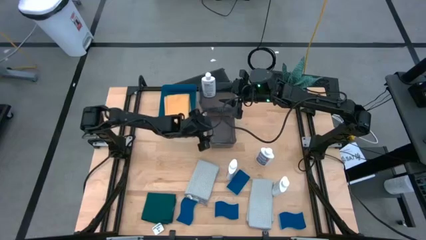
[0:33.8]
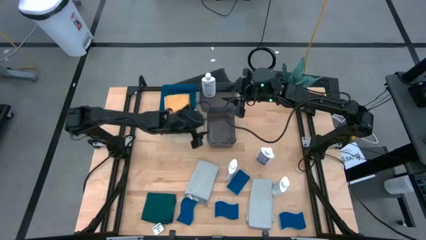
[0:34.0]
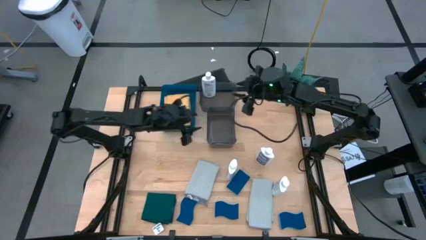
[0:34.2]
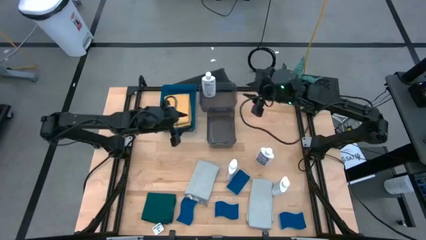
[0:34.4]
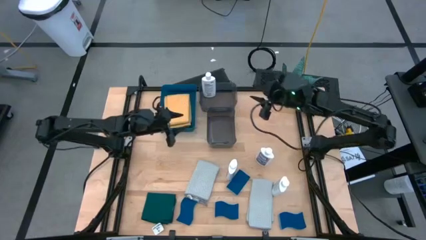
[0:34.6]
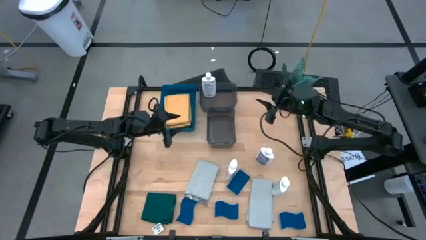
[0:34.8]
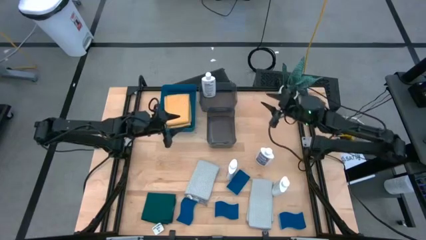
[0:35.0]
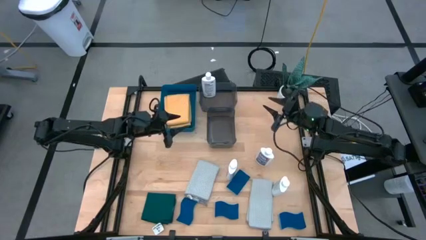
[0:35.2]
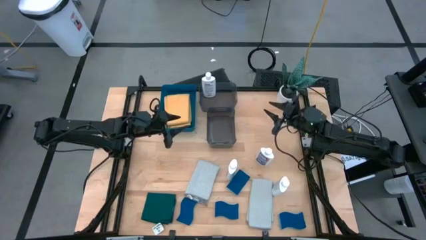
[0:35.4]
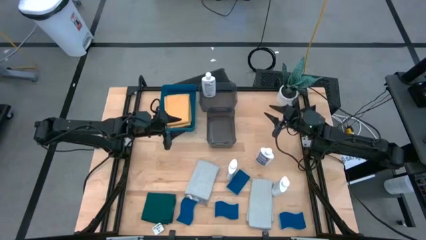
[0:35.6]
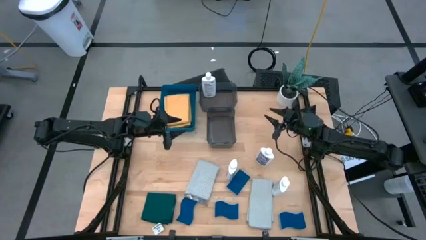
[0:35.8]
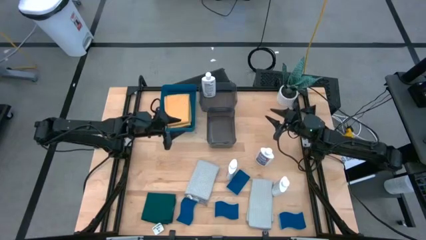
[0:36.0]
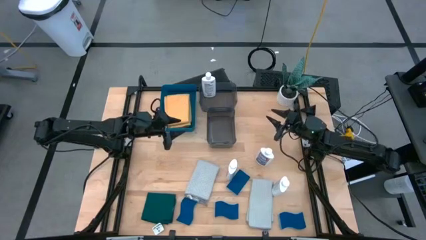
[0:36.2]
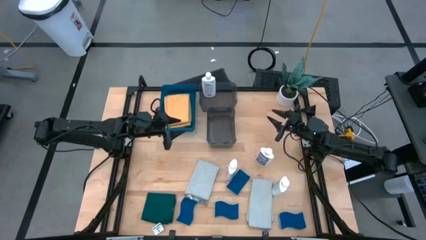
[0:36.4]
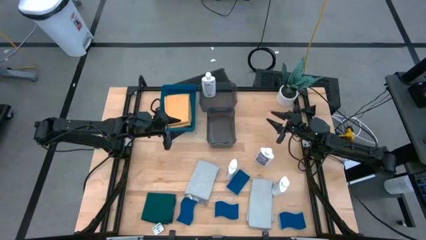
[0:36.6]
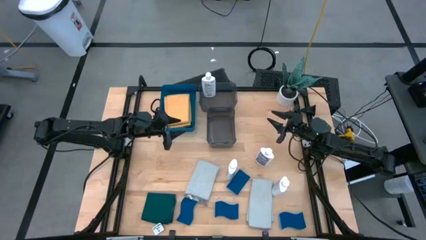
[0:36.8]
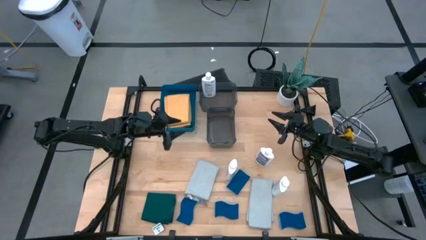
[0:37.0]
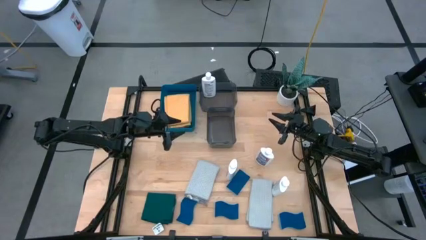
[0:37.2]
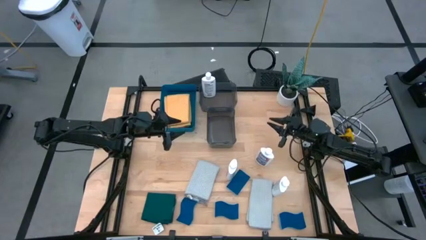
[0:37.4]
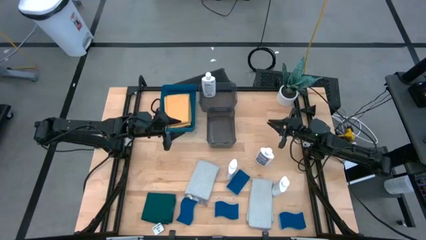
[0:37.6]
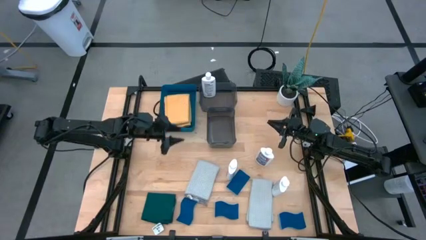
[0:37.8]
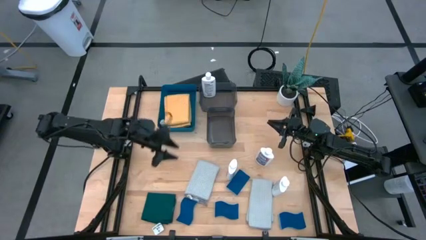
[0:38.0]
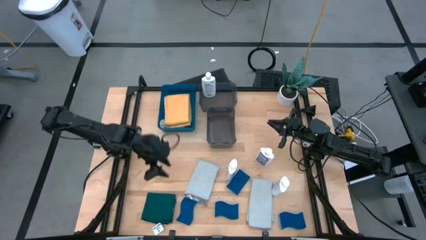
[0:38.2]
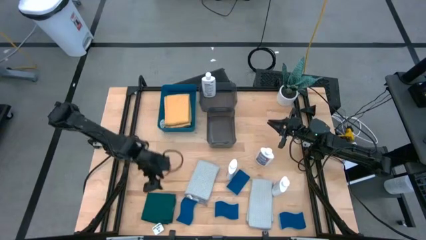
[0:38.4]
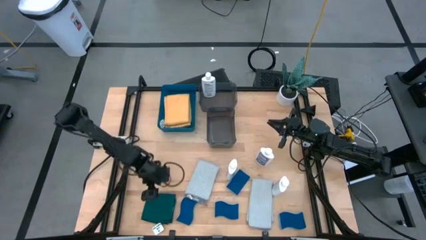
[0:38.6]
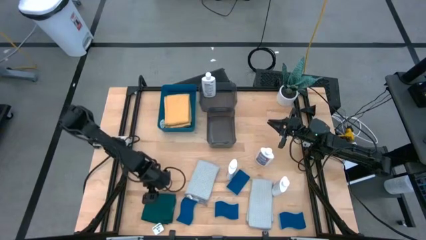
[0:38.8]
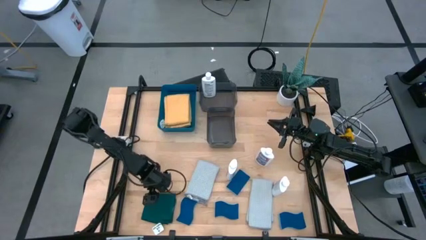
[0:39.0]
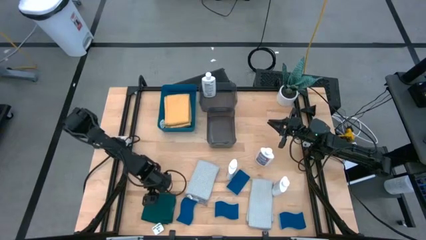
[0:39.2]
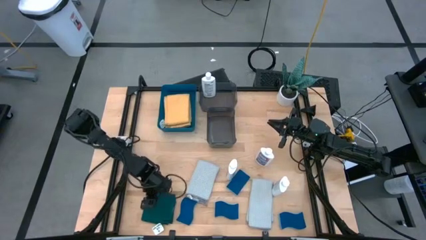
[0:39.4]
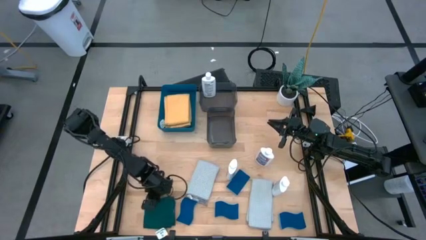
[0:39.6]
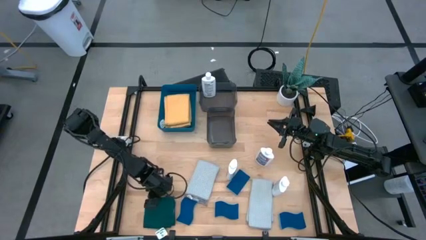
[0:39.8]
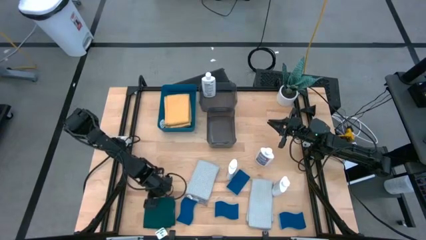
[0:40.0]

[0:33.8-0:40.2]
Task: Pick & Place Kitchen Items
Put the green microfiber towel into the blue bin

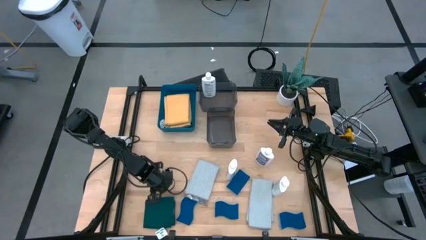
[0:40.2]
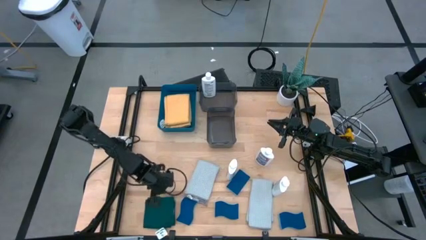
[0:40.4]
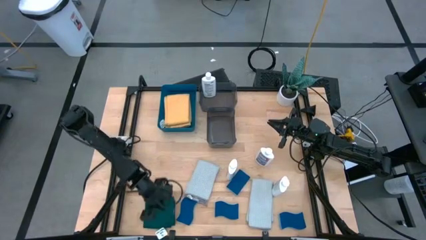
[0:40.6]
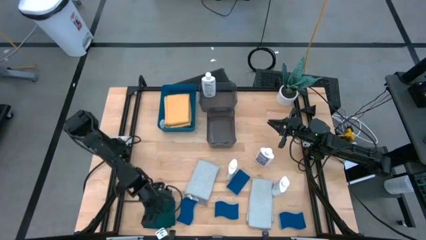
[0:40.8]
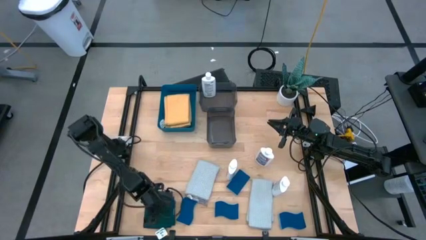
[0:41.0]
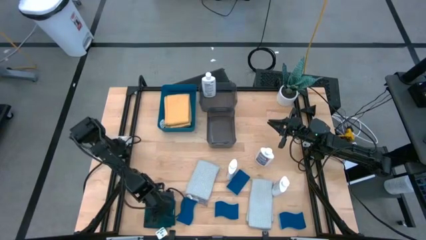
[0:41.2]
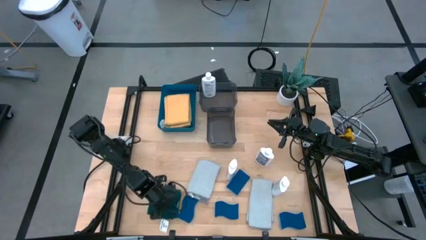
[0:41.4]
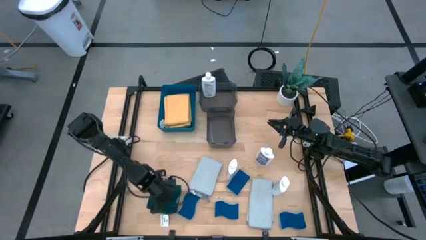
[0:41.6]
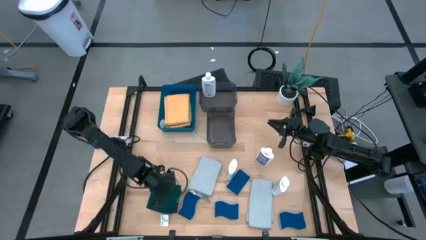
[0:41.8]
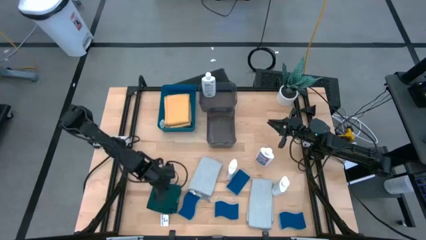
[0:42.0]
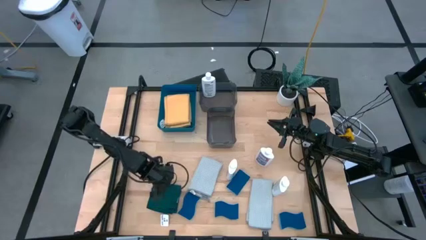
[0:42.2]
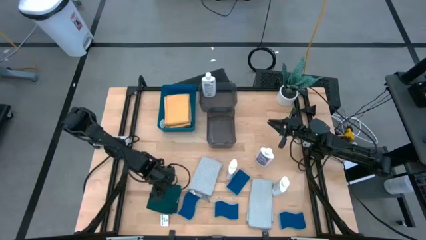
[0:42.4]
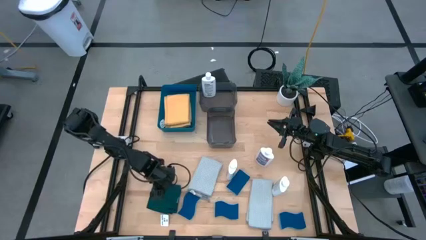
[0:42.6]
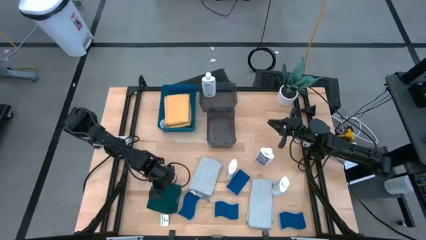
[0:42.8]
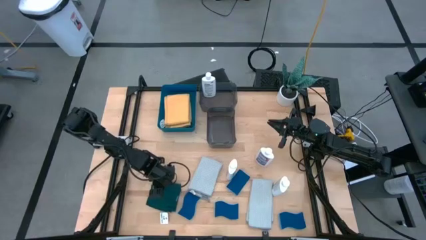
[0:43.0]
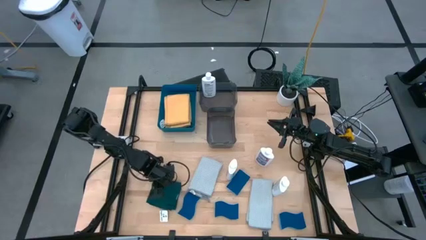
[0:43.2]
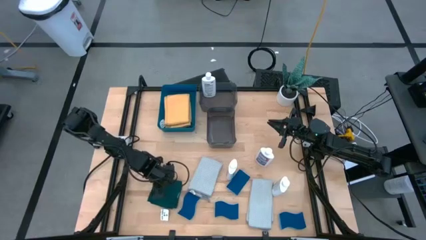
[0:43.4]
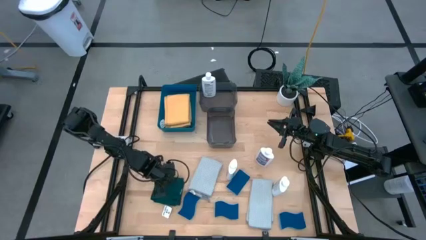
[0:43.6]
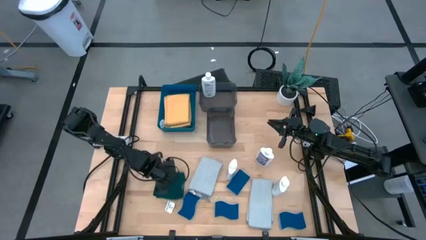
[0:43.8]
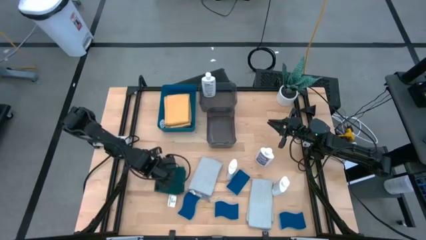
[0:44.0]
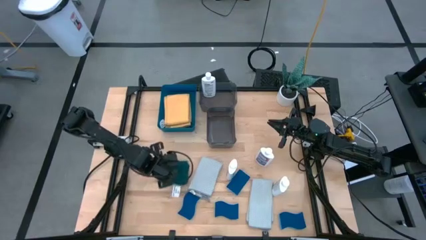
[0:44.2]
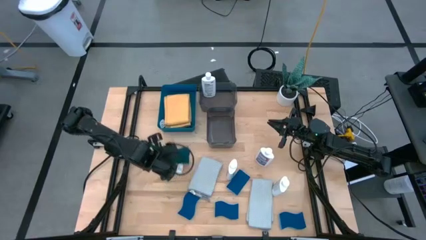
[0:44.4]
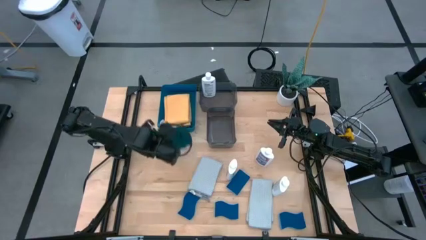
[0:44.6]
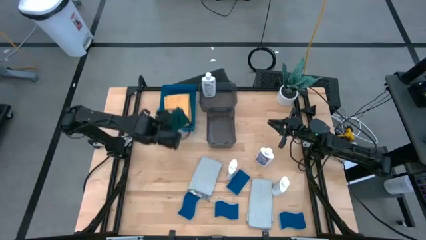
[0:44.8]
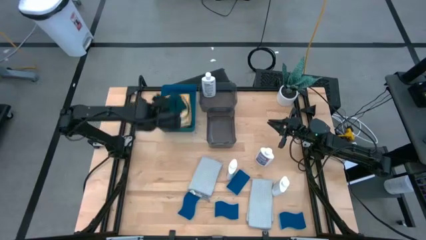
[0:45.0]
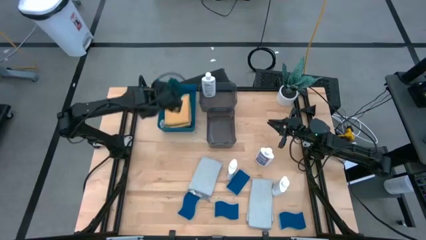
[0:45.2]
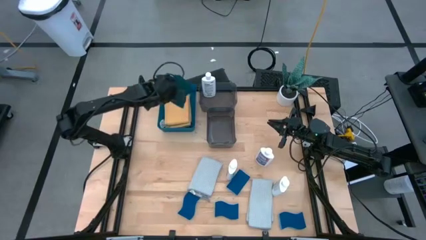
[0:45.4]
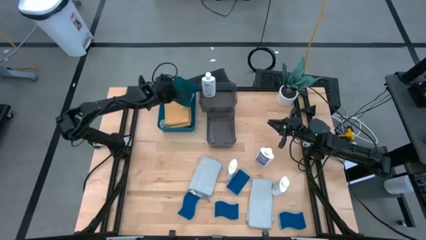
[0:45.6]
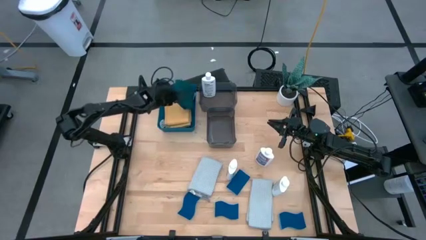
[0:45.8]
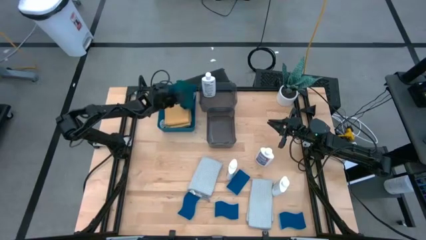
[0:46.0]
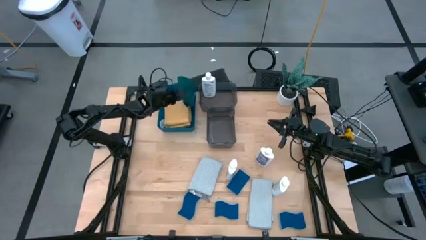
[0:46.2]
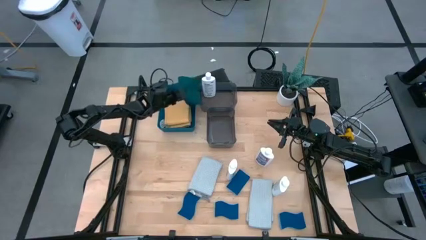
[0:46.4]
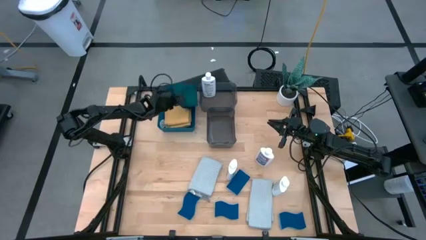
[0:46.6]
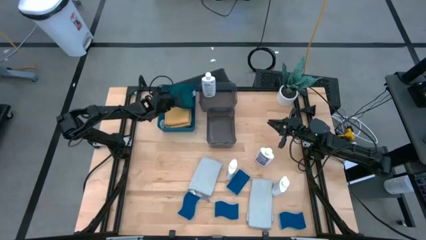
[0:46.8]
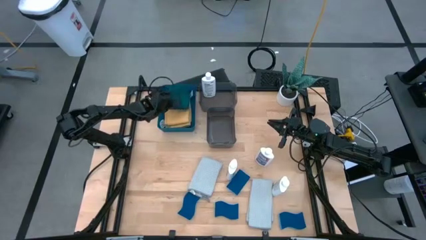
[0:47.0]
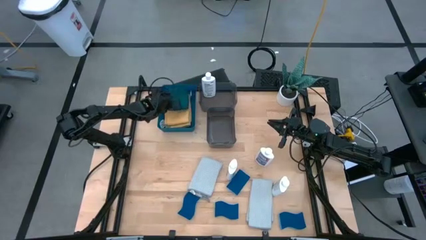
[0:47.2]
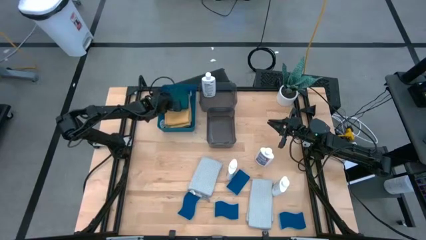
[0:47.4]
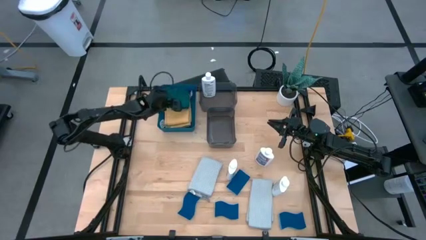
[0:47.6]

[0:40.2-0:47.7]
Put the green microfiber towel into the blue bin

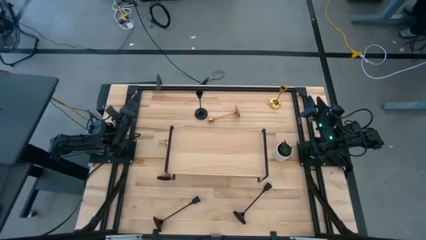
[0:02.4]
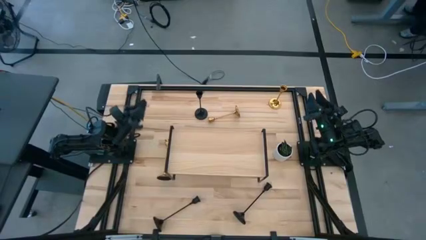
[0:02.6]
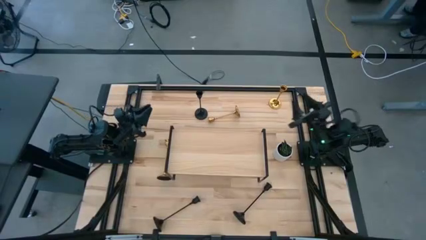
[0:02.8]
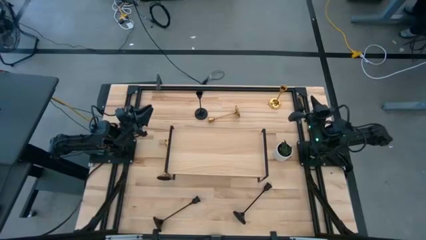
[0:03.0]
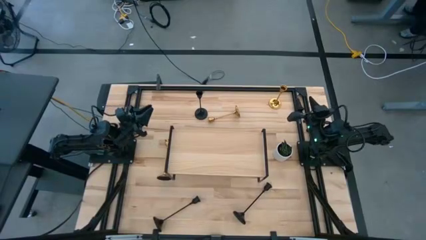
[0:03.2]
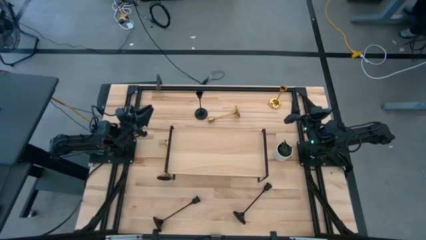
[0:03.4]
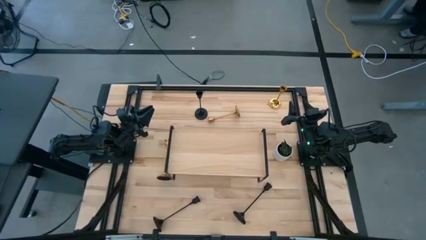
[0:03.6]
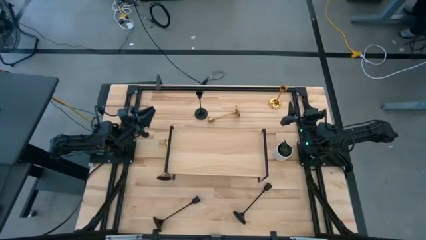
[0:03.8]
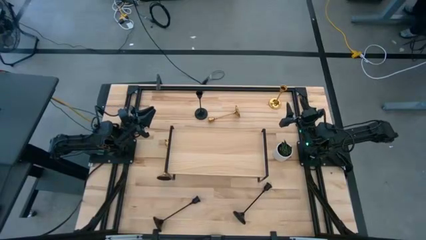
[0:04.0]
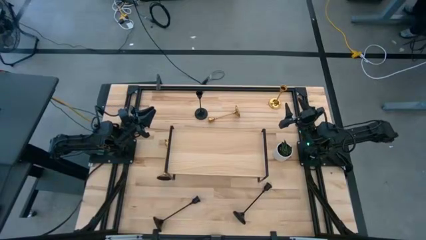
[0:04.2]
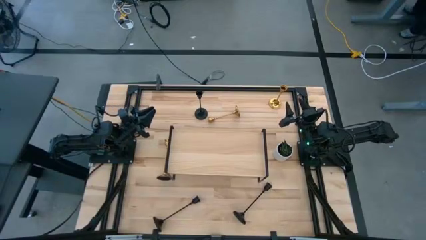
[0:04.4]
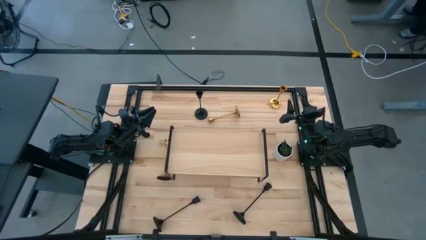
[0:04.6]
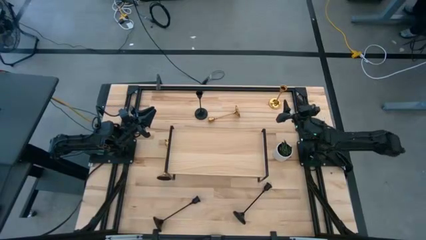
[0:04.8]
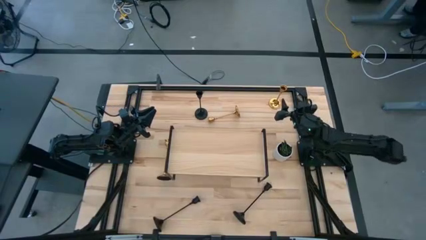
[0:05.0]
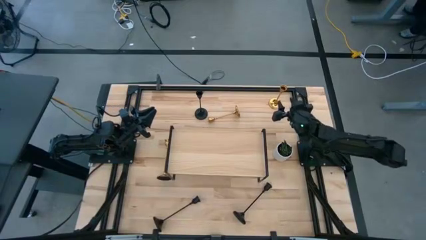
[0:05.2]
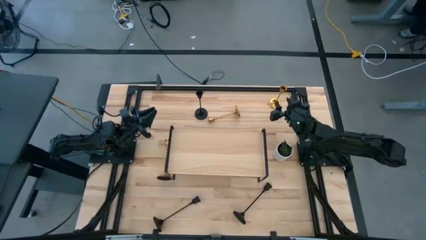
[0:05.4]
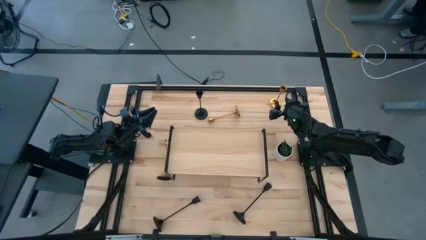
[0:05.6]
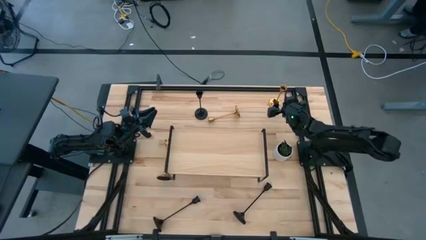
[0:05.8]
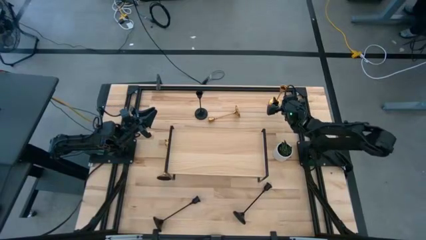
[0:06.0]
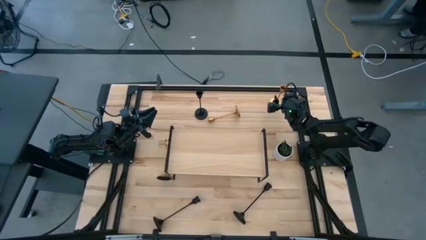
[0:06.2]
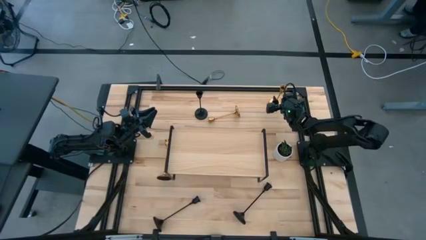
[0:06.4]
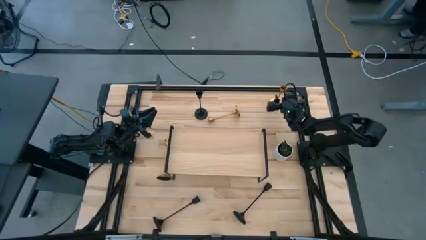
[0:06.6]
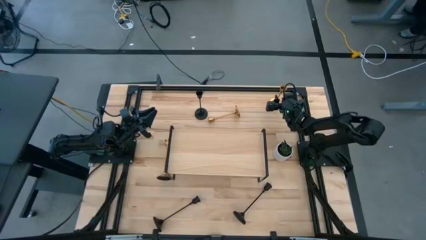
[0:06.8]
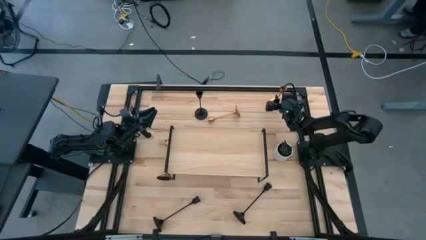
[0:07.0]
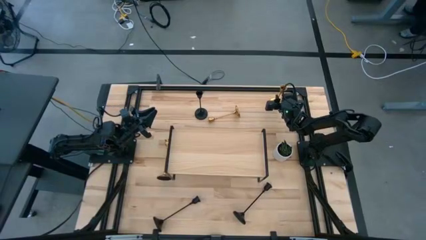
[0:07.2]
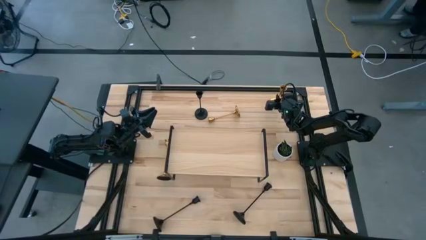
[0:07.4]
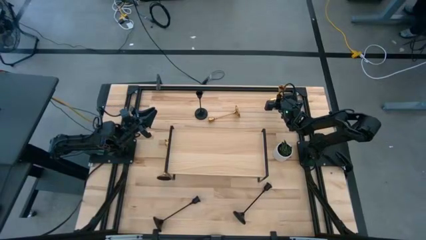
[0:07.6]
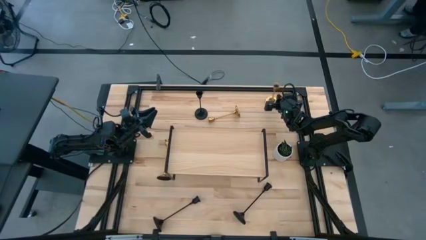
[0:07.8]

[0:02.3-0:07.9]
Task: Pick & Place candle stick holders
Put the top right golden candle holder on the shelf
